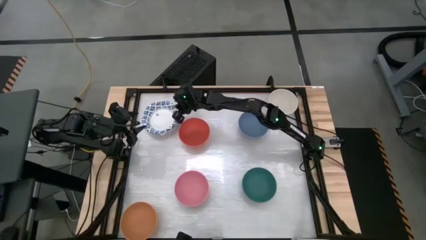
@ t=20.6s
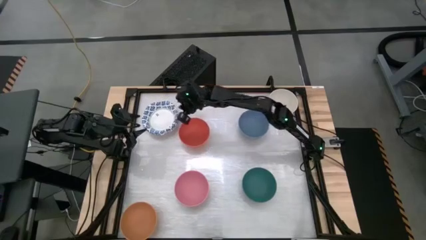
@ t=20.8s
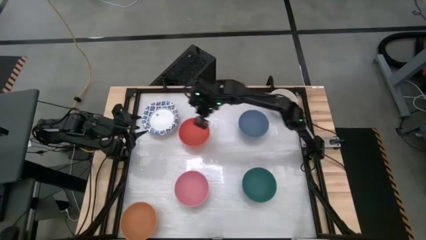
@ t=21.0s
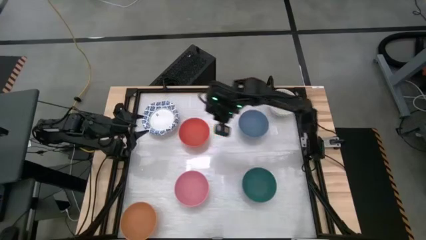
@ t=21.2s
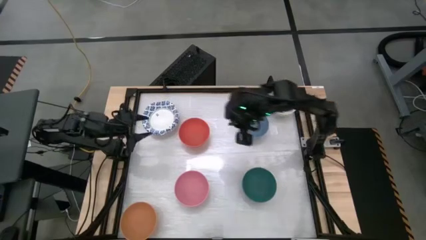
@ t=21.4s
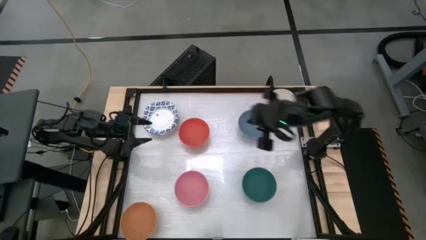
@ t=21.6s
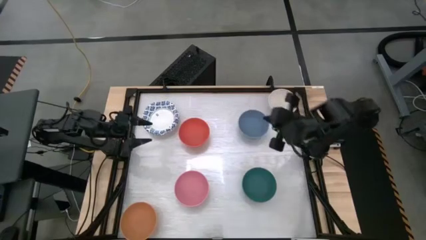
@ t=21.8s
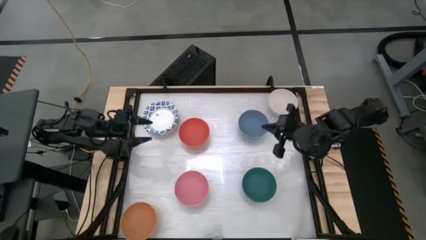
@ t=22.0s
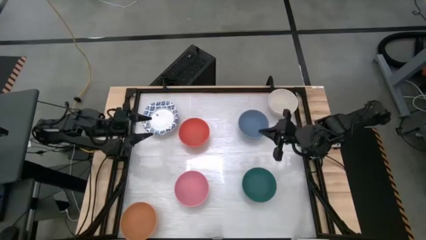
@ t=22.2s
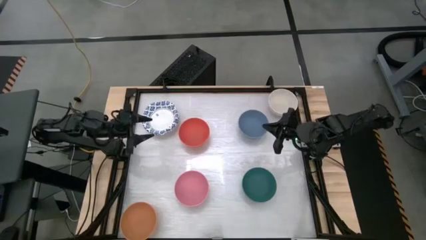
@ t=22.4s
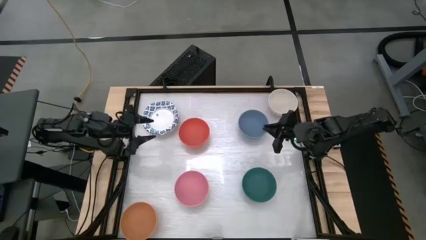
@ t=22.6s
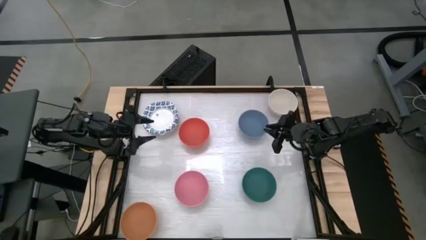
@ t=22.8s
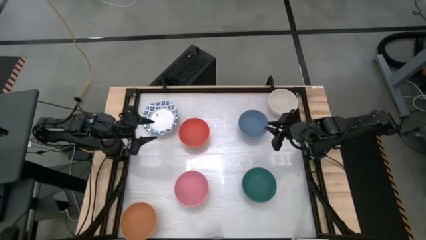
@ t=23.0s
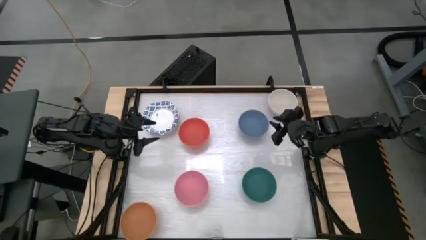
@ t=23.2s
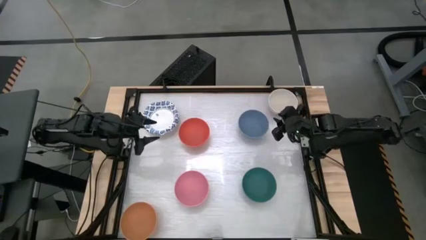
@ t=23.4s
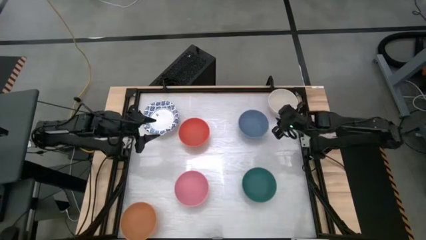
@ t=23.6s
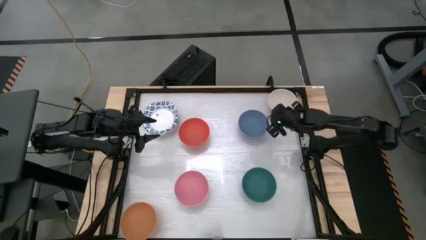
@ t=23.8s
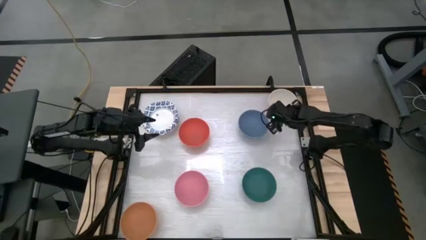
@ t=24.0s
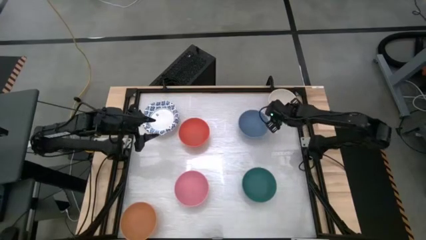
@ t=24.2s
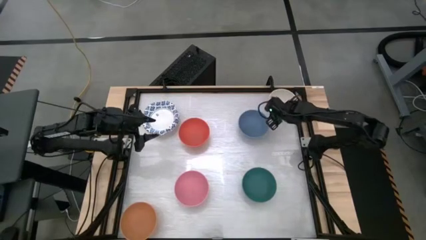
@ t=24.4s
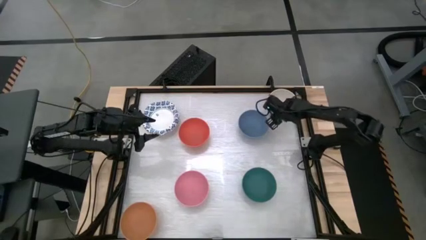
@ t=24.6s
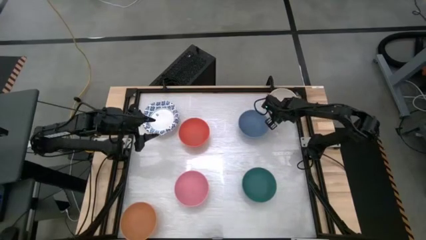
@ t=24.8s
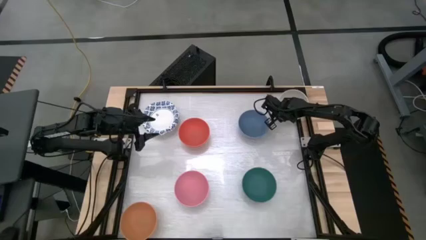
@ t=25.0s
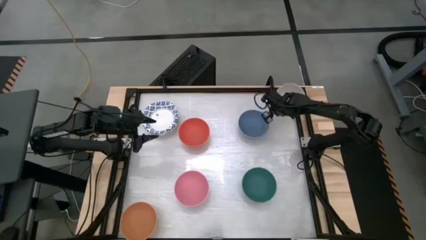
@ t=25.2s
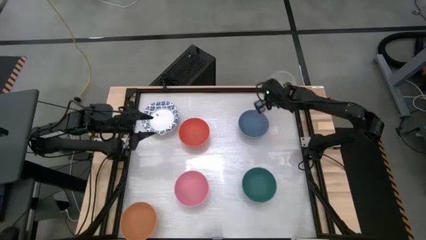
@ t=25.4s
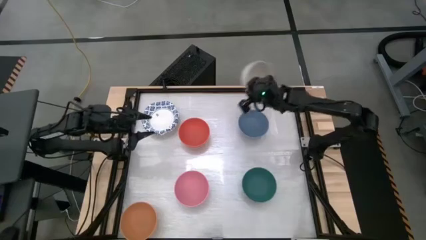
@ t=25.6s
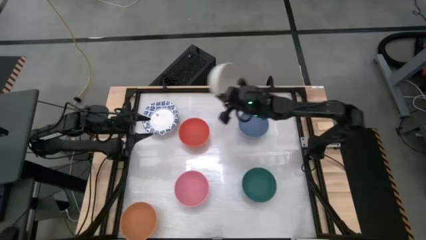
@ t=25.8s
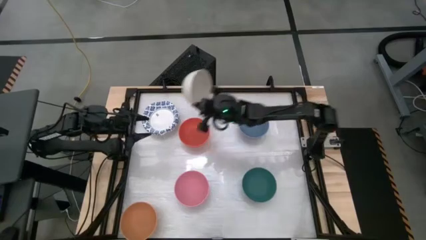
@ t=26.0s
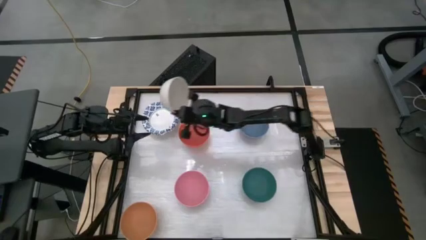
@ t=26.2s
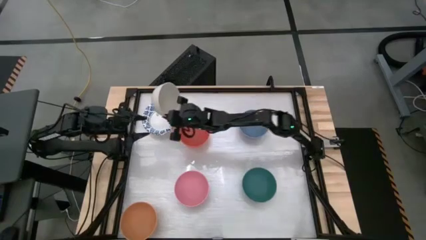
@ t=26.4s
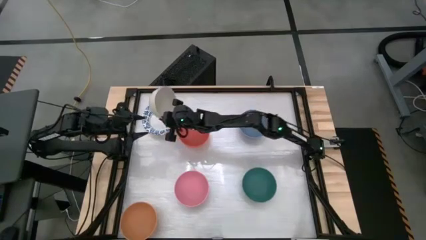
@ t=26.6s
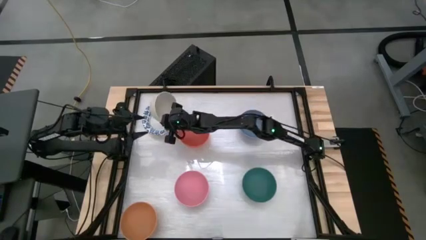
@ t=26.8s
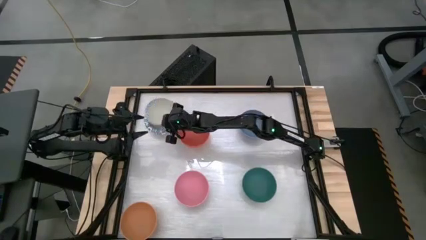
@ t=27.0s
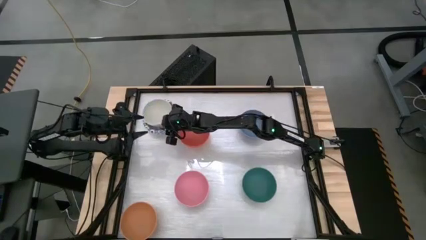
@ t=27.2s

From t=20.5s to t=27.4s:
Stack the white bowl on top of the white pattern bowl

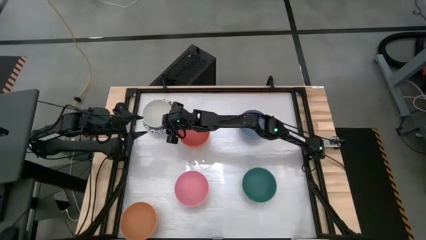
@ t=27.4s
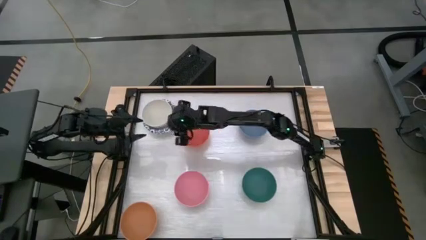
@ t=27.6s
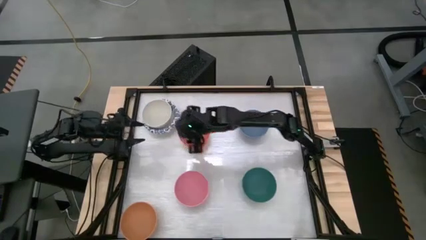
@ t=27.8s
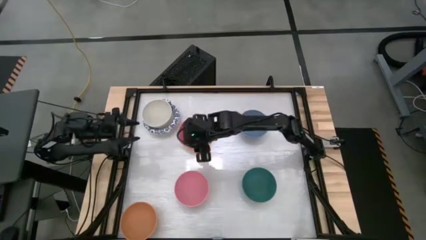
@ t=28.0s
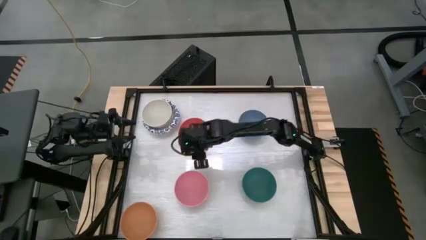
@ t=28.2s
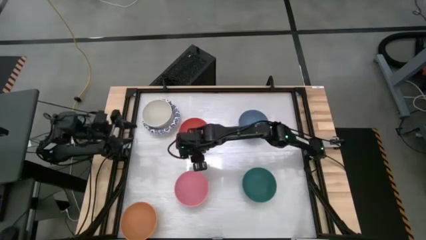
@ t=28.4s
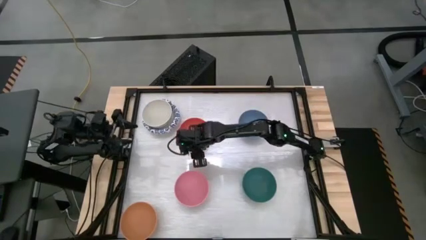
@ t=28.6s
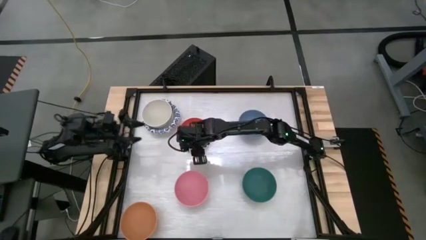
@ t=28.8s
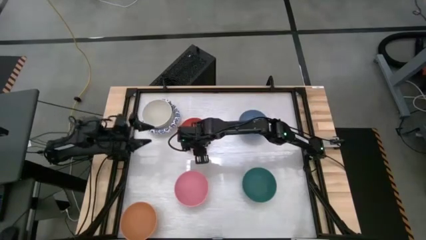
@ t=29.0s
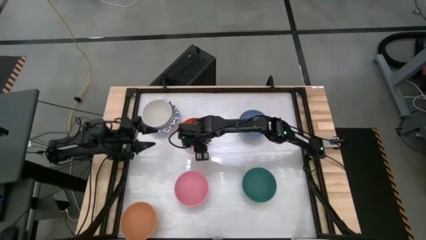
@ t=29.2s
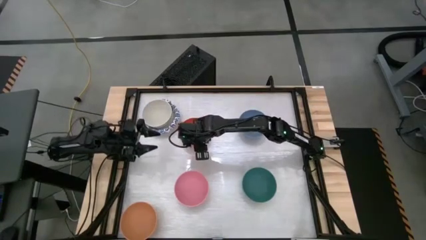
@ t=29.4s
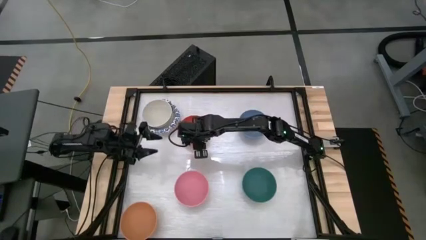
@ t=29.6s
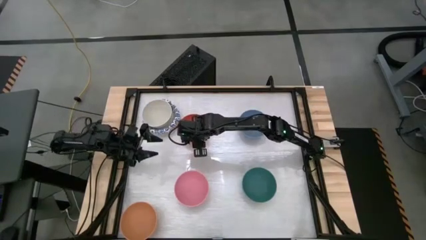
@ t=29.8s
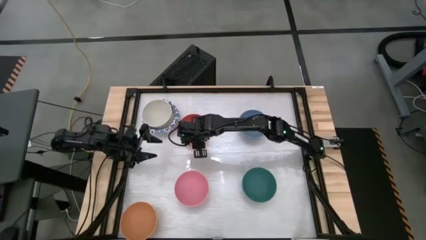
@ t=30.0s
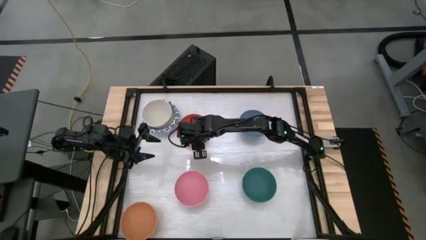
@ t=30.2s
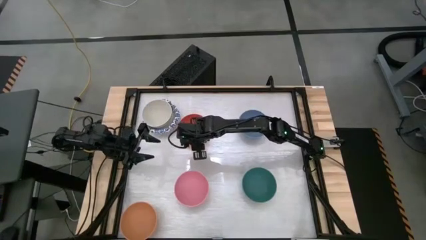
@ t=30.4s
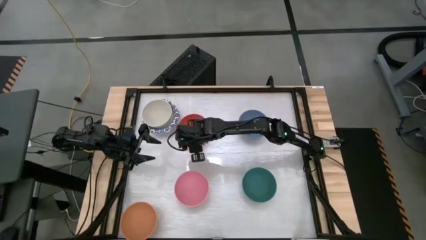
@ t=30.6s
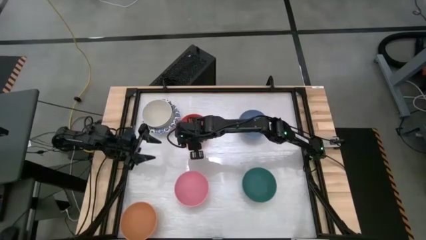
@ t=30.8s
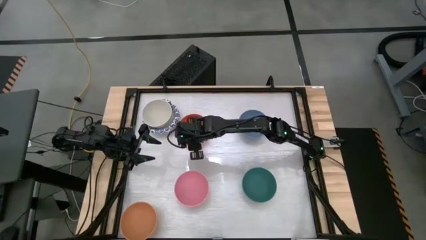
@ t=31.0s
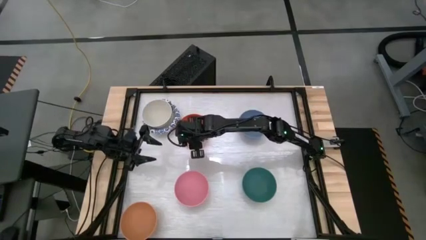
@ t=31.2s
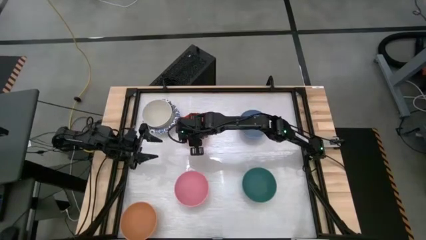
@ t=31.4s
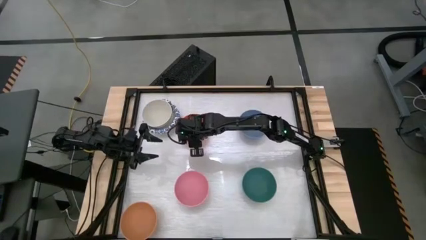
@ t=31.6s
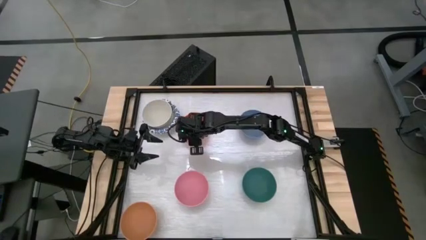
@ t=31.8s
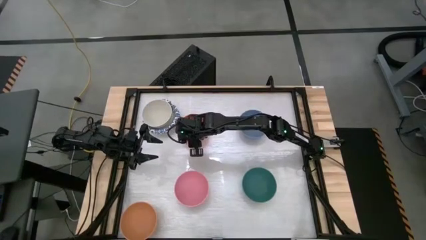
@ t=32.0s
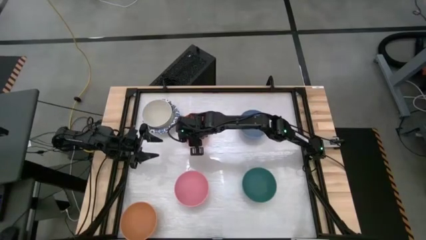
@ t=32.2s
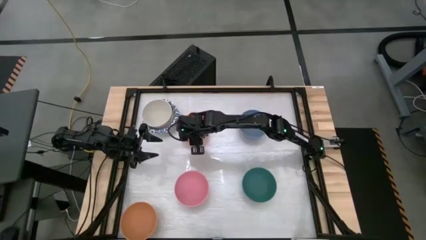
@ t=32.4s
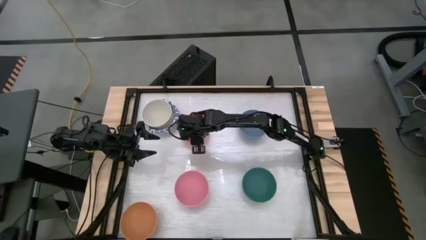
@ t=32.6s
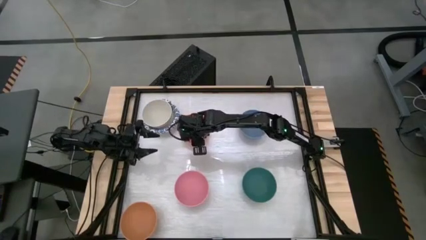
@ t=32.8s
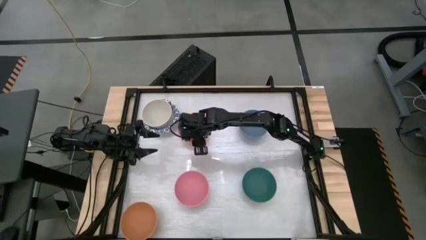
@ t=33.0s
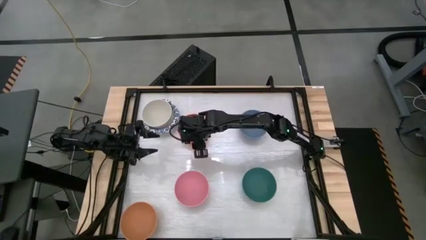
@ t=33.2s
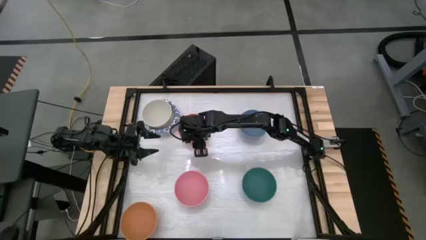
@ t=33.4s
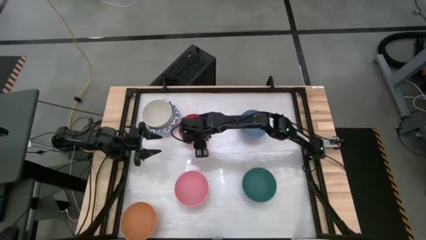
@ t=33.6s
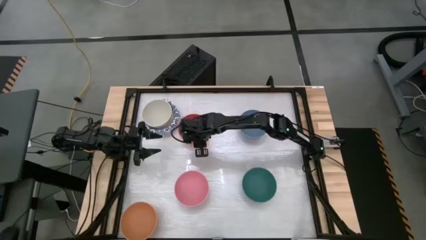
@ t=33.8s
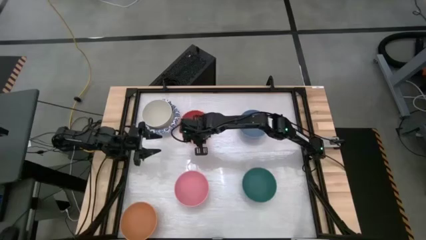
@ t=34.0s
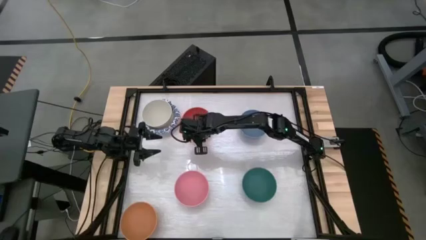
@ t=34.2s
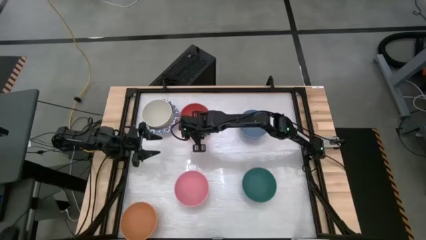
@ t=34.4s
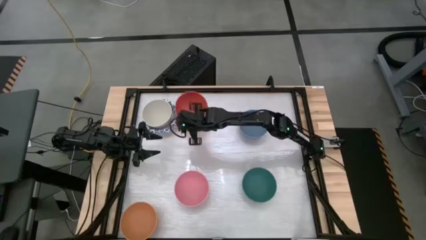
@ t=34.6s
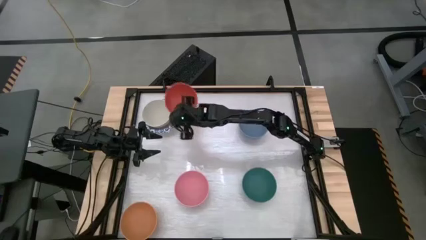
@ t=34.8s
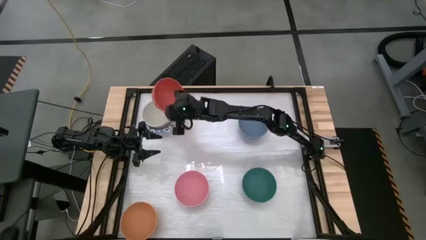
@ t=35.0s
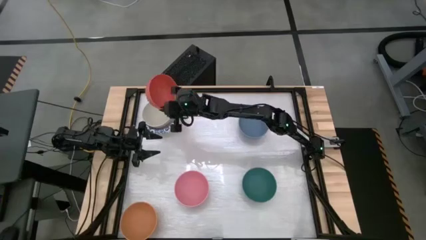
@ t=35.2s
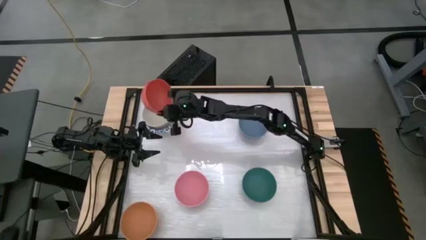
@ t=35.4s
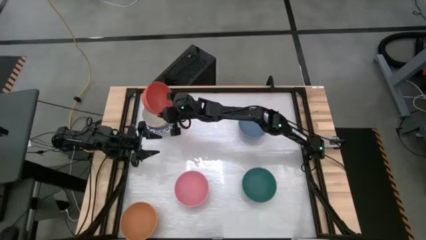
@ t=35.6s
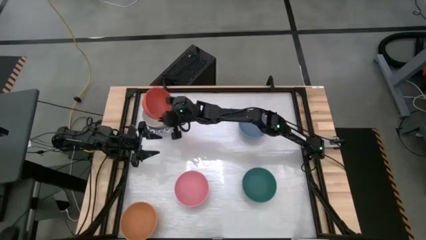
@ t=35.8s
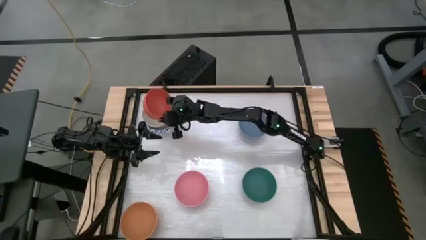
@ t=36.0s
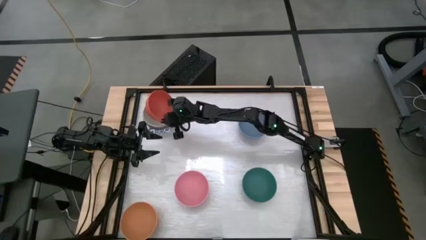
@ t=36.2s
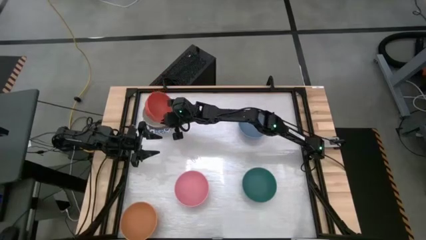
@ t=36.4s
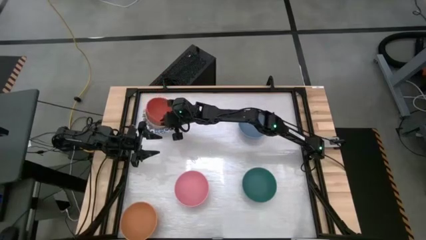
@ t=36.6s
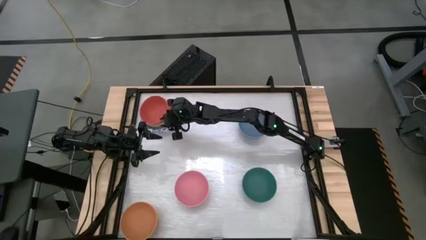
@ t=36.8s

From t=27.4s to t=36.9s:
Stack the red bowl on top of the white bowl
